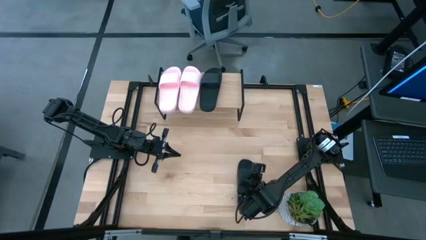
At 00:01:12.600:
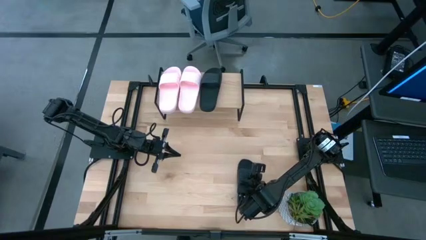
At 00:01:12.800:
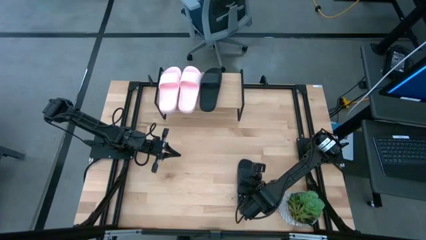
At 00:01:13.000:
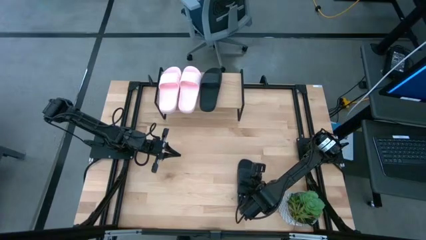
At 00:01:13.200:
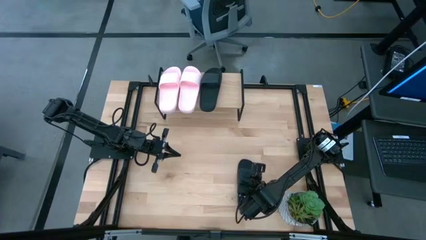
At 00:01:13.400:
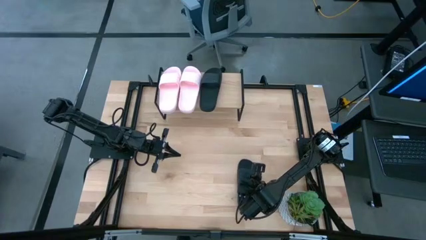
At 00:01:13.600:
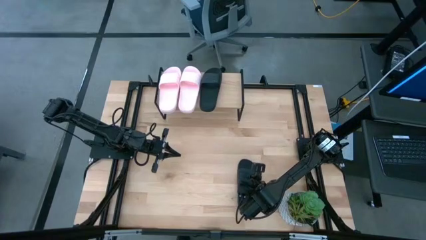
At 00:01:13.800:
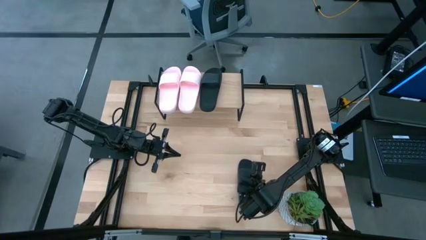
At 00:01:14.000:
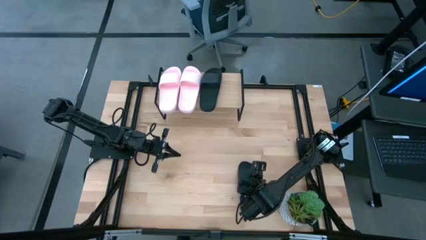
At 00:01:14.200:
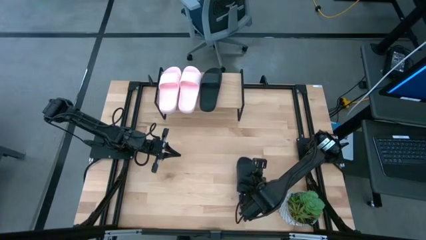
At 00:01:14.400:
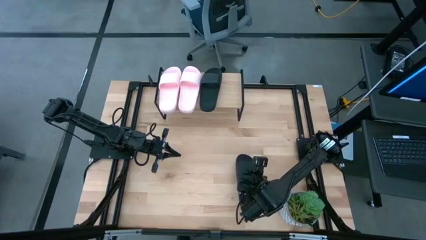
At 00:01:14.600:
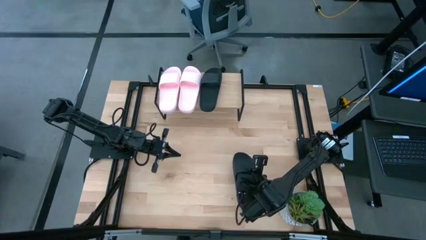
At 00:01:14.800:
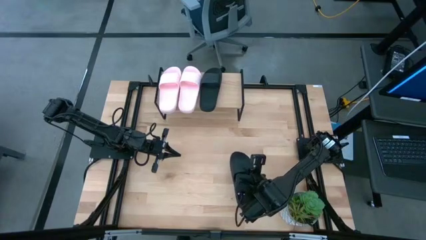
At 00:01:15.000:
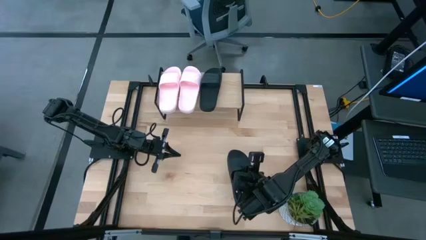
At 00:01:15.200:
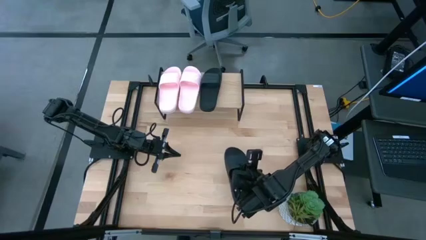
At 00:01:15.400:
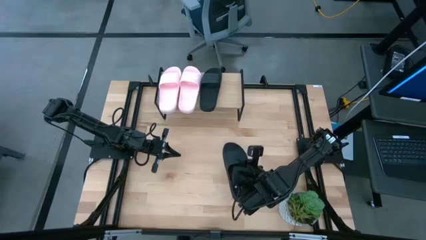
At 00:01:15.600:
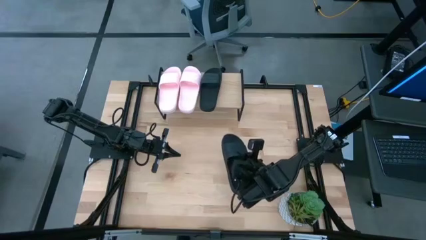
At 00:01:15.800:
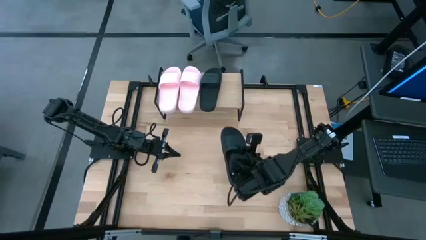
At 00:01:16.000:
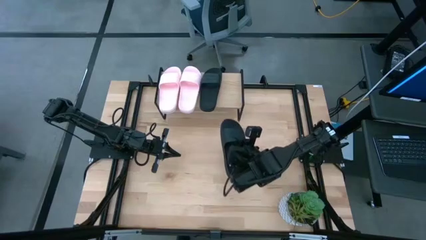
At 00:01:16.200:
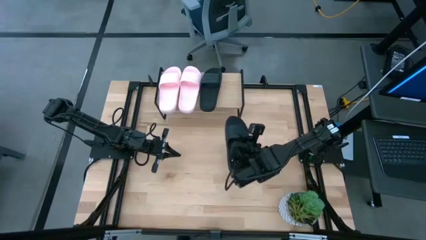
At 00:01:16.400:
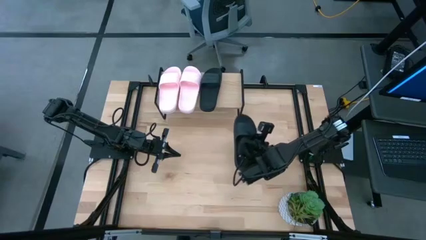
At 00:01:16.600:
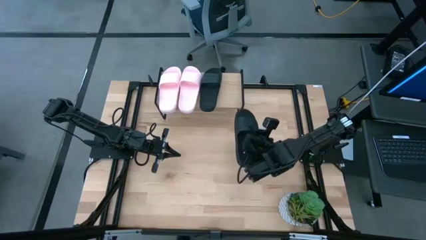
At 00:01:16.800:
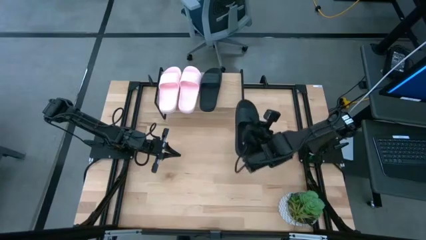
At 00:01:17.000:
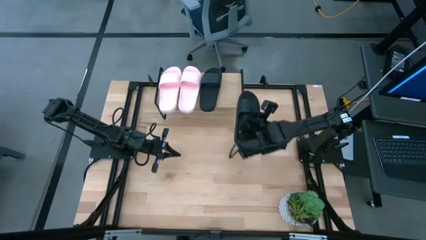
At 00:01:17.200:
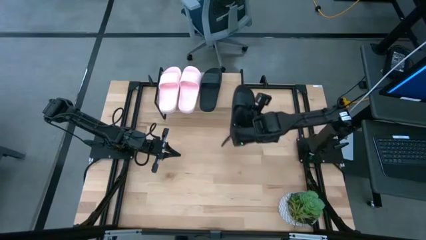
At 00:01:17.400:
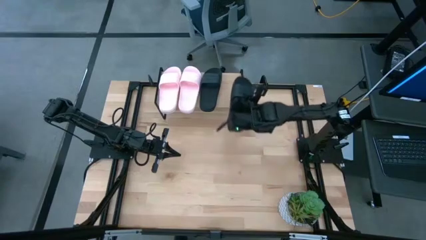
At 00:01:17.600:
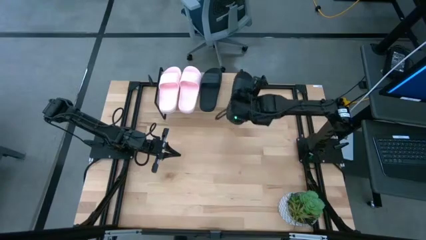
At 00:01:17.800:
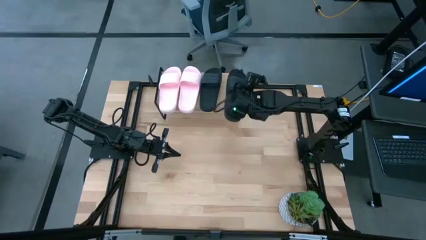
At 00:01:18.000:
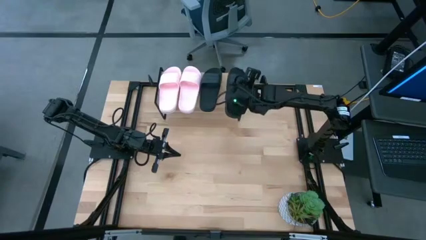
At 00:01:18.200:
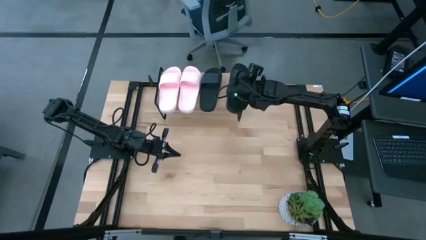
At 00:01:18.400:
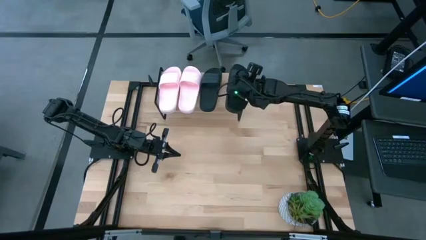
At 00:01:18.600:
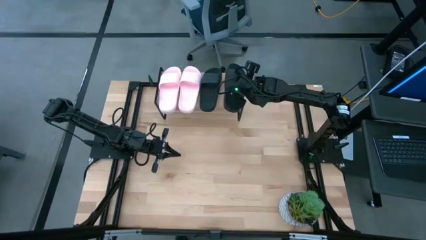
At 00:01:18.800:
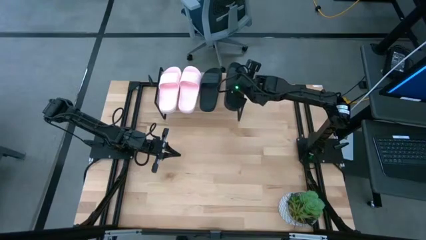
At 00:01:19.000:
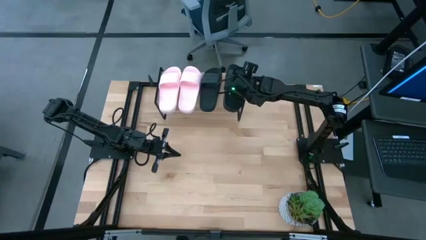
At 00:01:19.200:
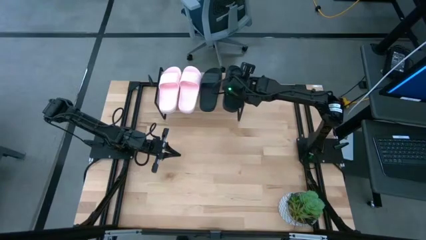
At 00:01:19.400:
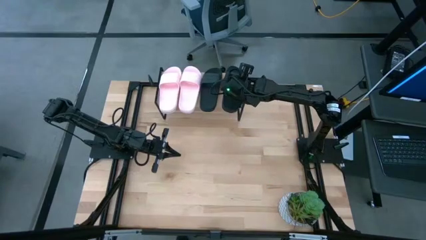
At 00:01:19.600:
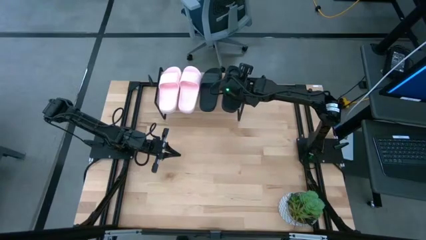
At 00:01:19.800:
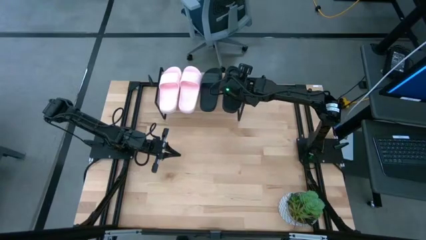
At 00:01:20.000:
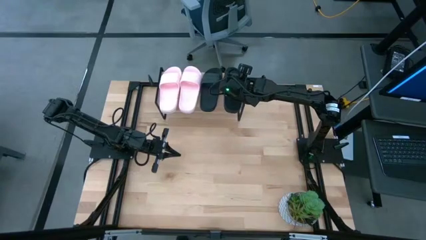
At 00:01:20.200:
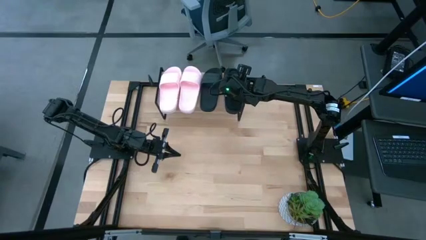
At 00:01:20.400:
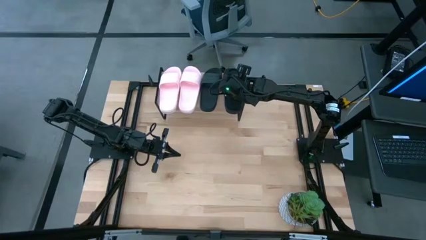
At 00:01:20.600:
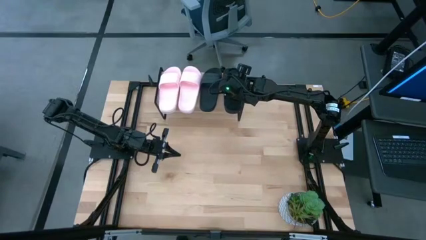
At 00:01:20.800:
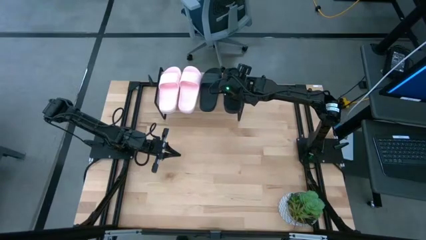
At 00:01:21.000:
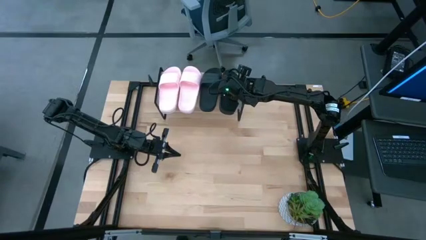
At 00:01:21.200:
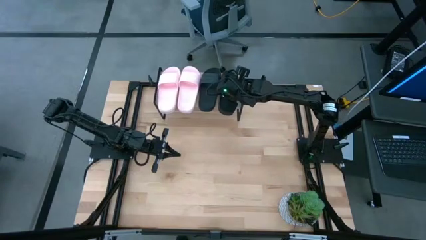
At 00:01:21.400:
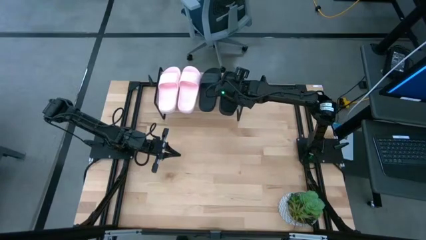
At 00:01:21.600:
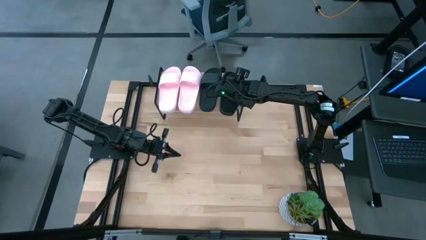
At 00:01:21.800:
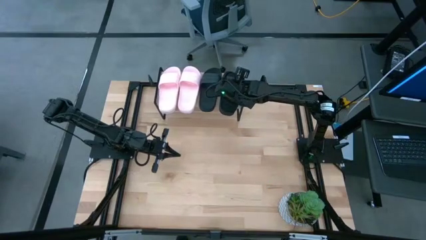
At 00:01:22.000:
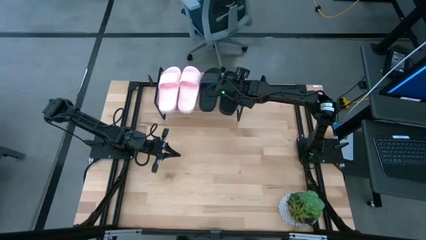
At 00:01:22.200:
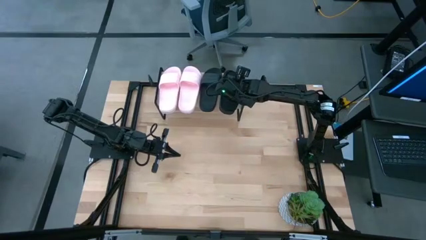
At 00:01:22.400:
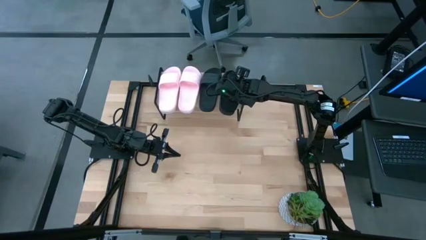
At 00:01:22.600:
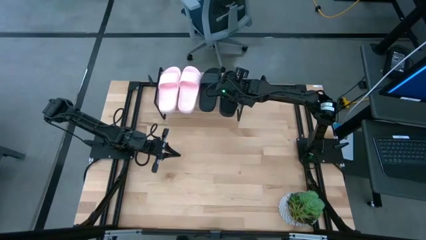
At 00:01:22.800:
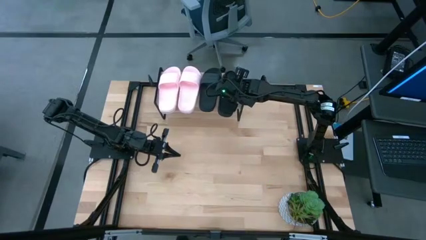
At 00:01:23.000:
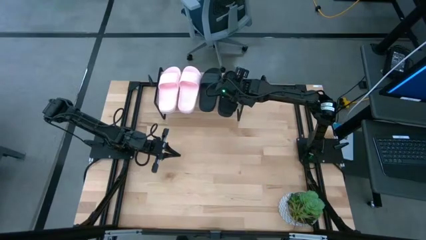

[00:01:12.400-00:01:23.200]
Task: Pick and place slides into the shelf
Put the black slipper on the shelf

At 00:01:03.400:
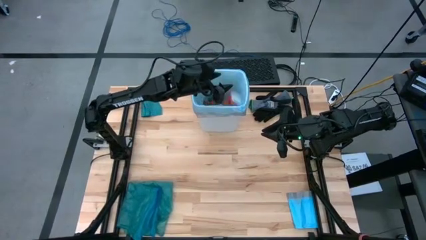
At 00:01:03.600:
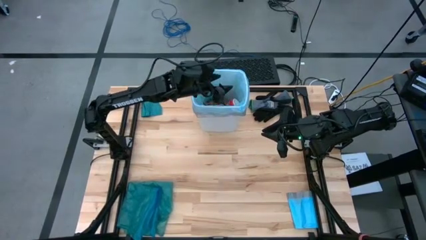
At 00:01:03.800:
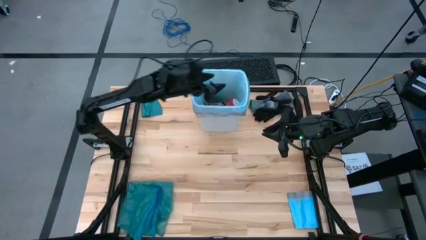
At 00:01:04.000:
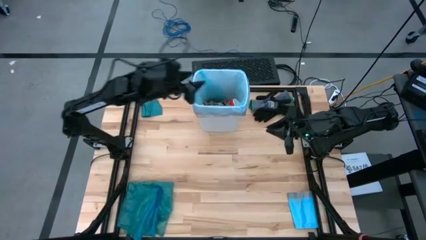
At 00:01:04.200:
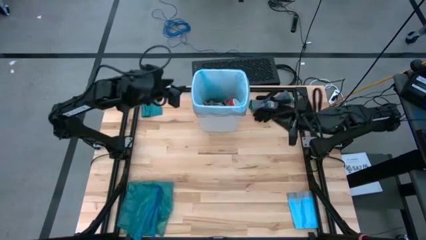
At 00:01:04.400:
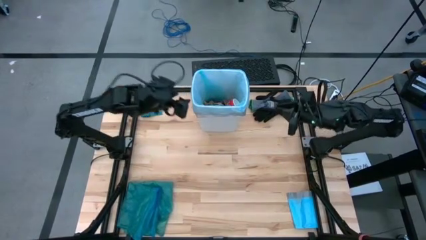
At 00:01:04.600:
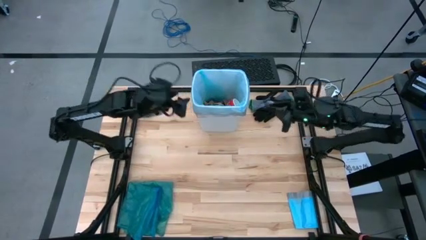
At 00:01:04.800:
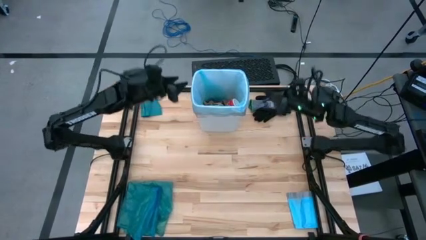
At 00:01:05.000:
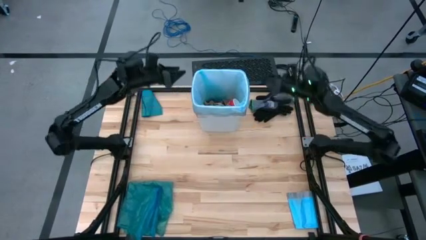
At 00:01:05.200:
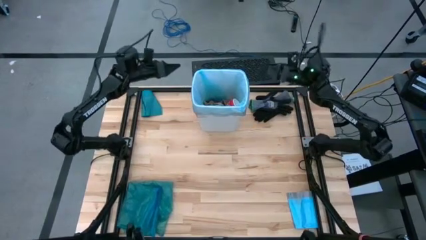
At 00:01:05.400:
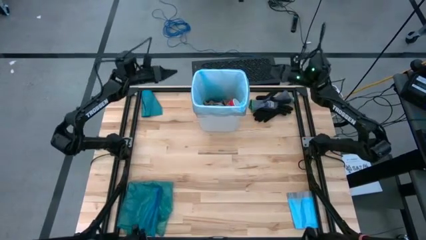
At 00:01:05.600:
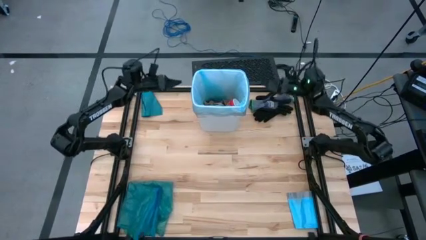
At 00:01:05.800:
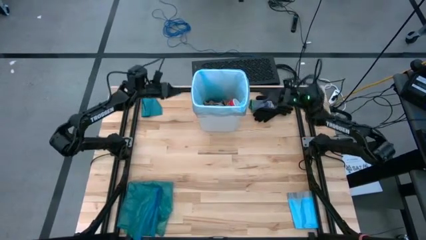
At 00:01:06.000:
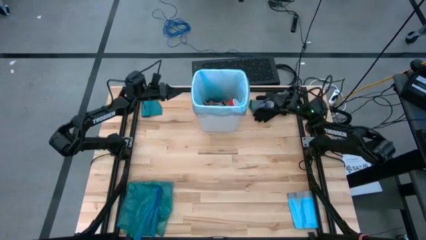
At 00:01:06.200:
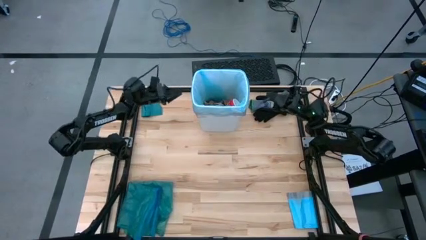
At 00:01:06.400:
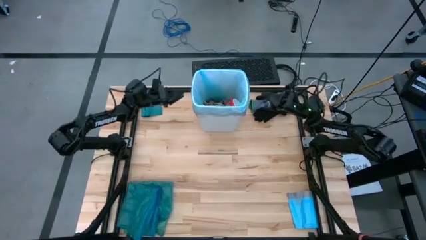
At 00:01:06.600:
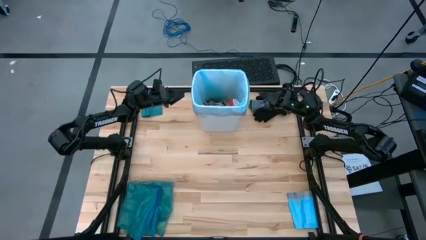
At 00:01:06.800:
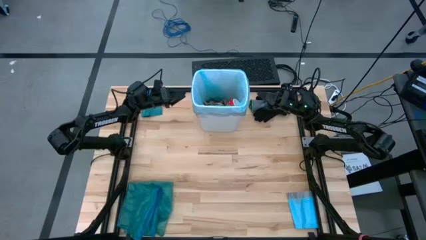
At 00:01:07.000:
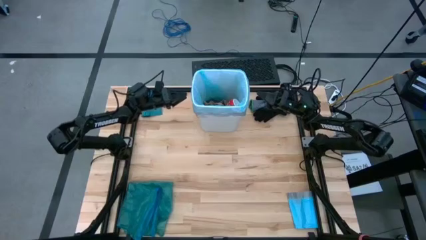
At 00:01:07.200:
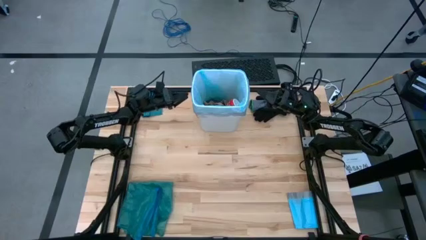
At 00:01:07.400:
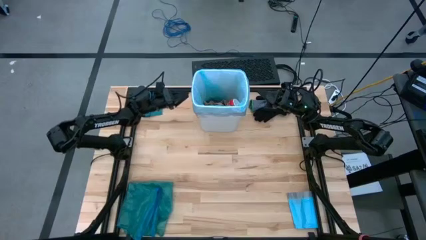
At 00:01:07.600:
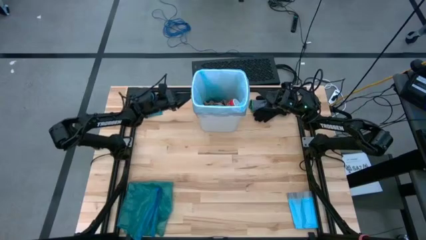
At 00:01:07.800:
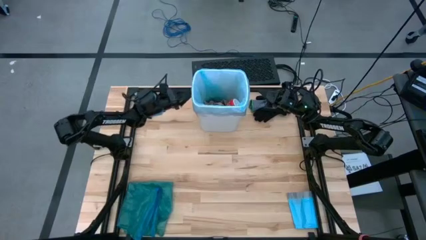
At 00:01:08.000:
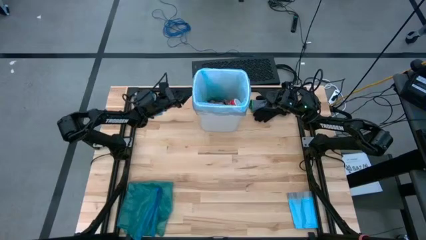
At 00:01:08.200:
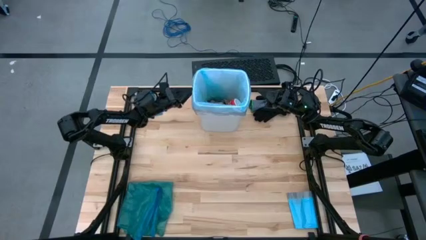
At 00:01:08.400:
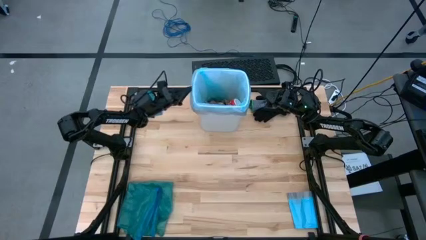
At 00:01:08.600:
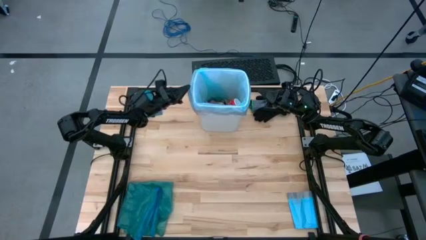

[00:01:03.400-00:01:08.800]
Task: place trash/remove bag and relplace
Remove the light blue trash bag from the white trash bin
